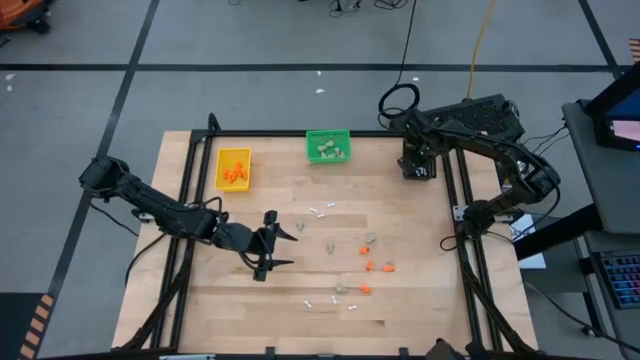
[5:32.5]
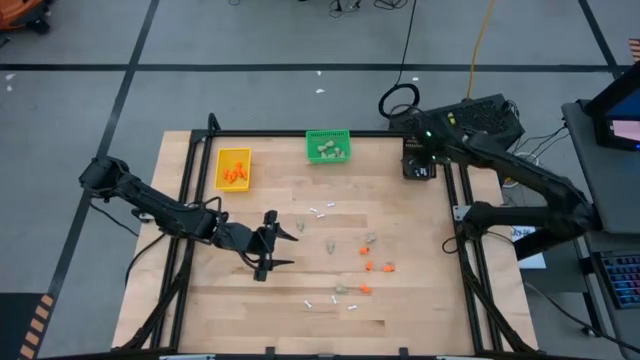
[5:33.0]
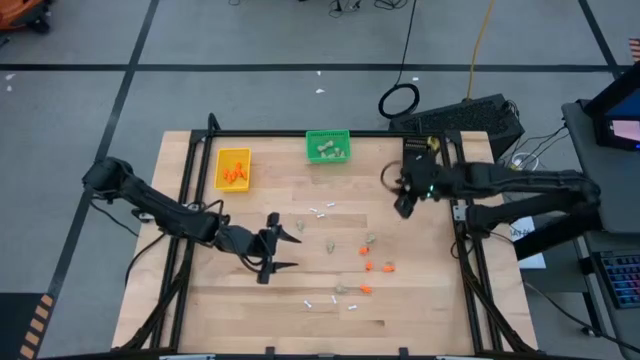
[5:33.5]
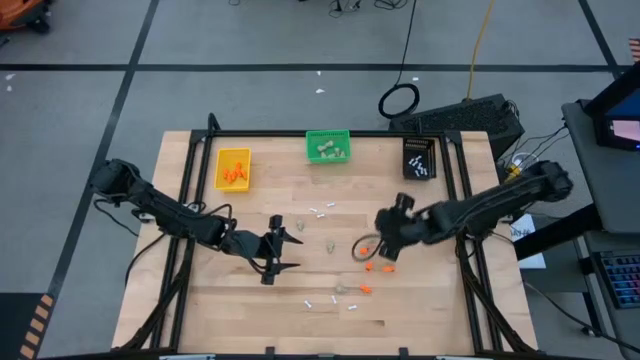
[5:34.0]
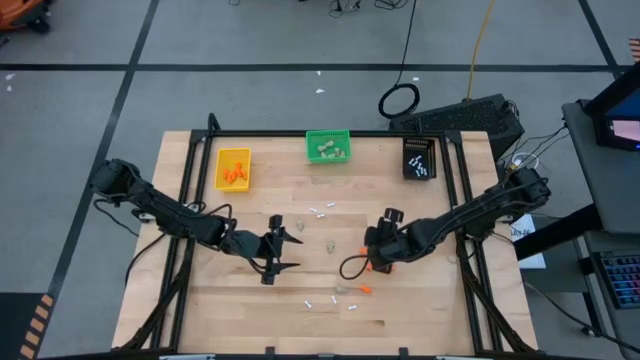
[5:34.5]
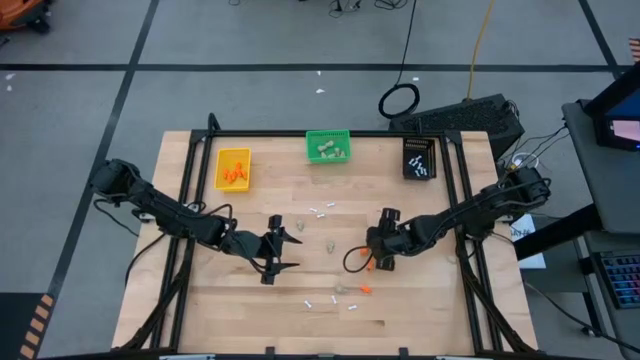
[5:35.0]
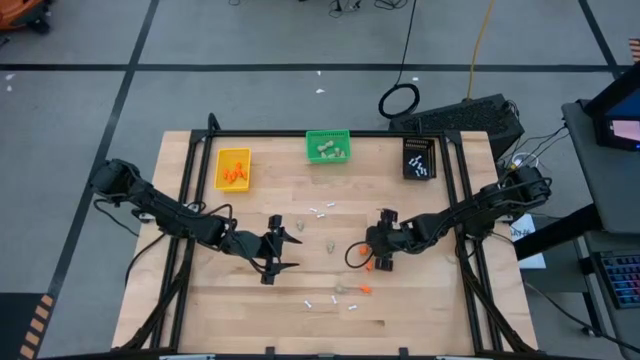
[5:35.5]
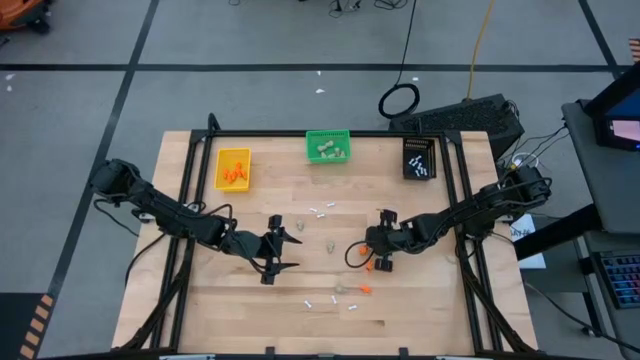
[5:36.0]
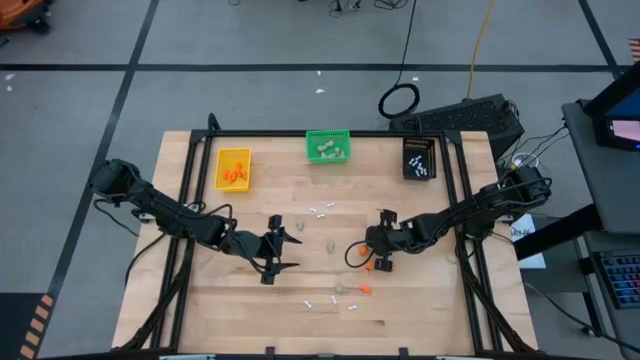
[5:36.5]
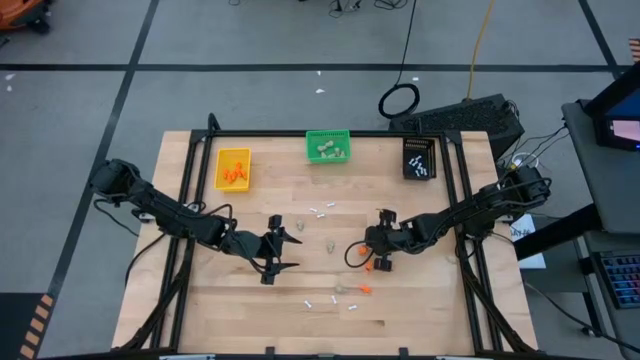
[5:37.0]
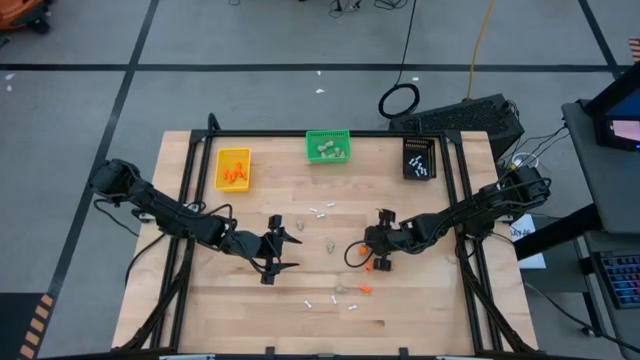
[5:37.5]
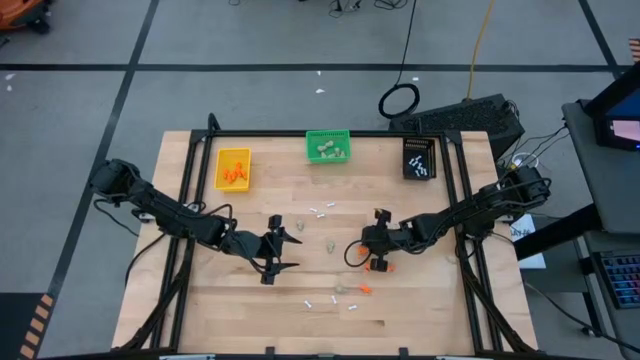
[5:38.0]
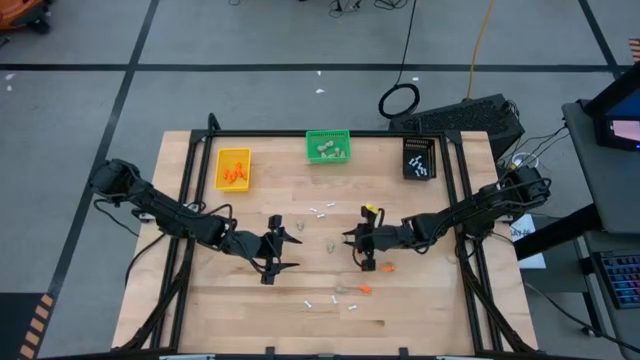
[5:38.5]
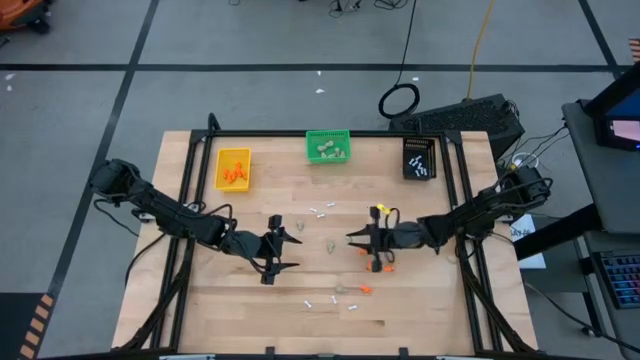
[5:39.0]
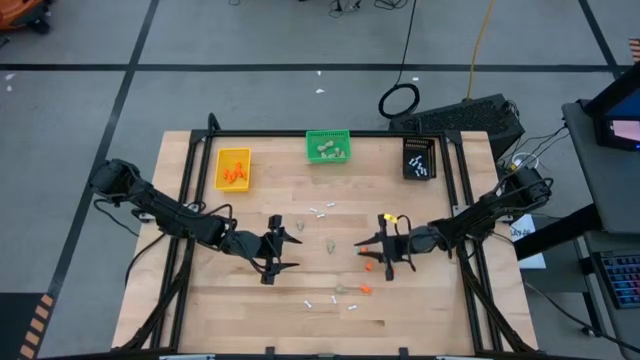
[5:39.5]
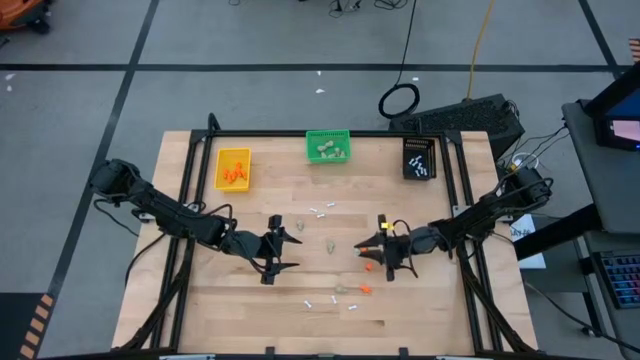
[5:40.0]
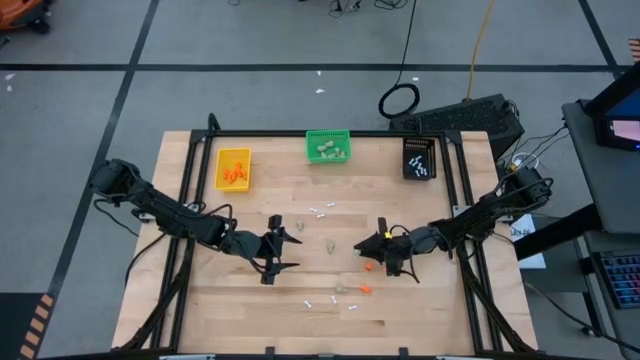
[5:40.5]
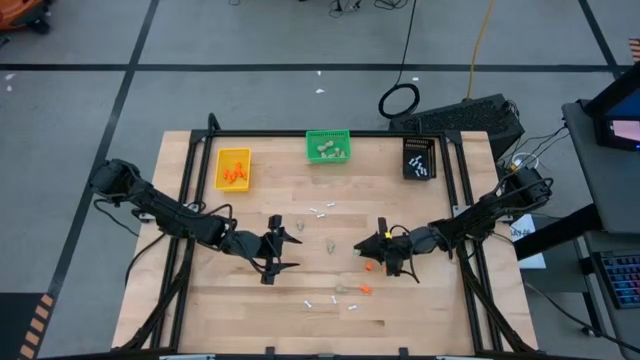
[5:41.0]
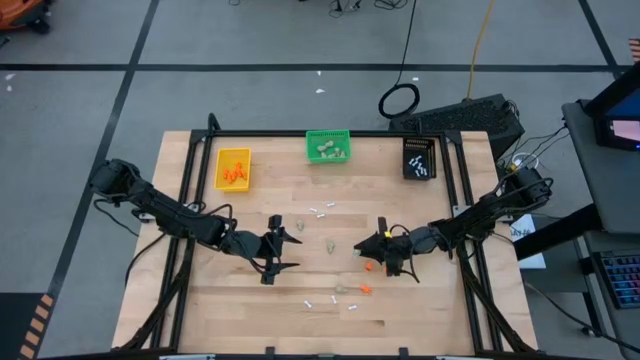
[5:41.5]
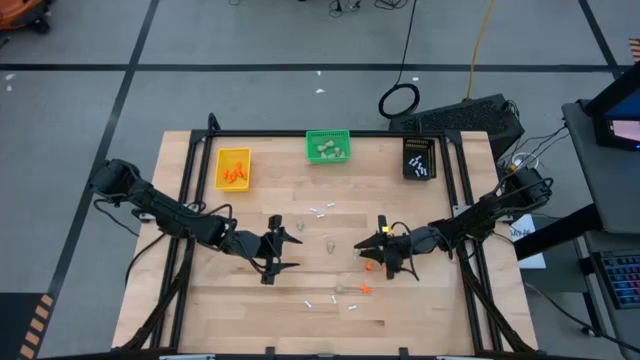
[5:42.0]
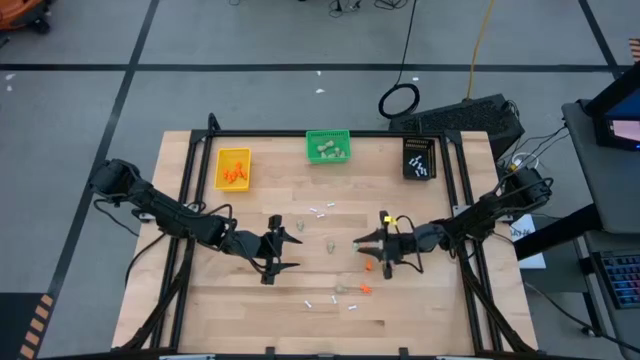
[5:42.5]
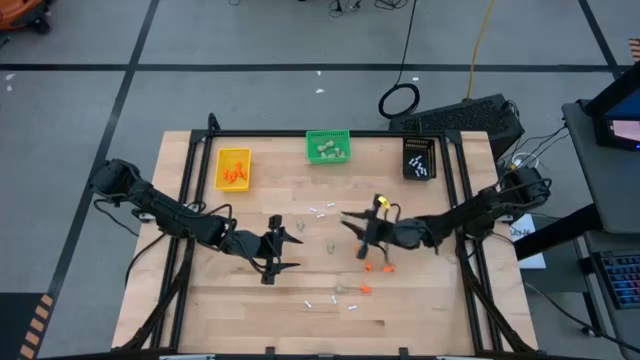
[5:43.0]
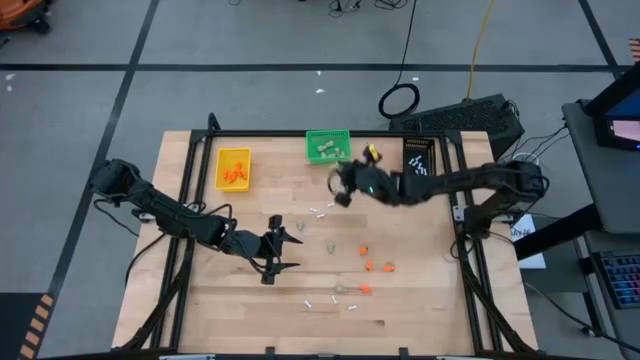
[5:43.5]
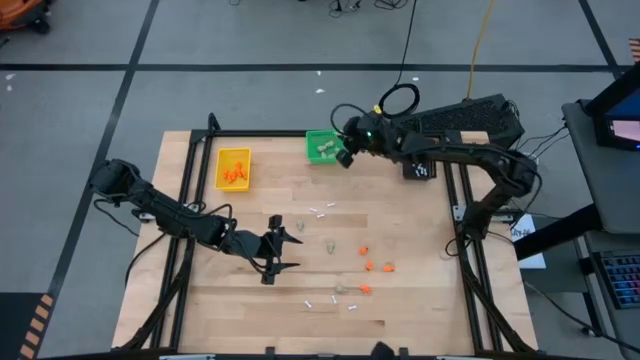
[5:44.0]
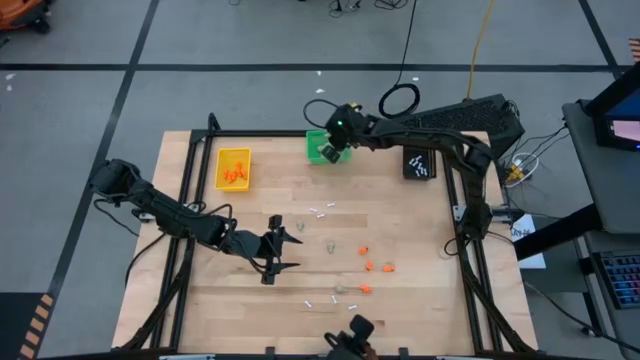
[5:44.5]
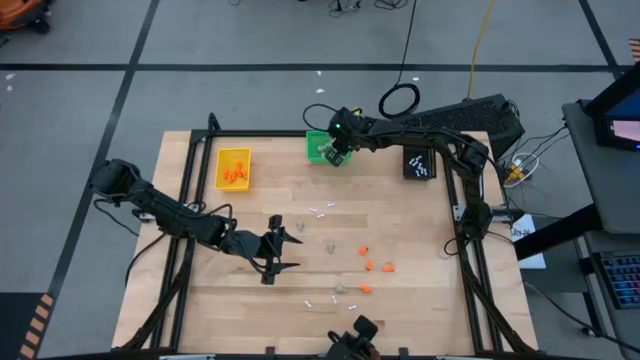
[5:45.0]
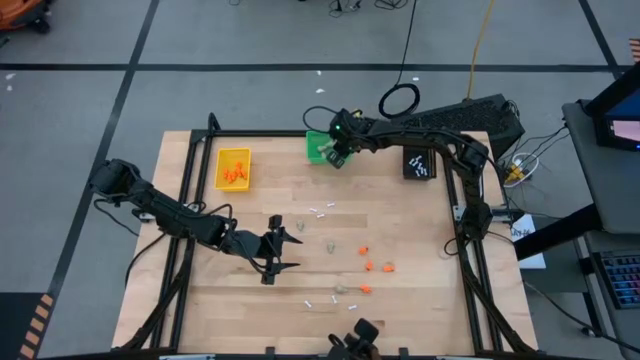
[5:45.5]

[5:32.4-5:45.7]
Task: Sort Halloween decoration
Put the gray skull toy into the green bin

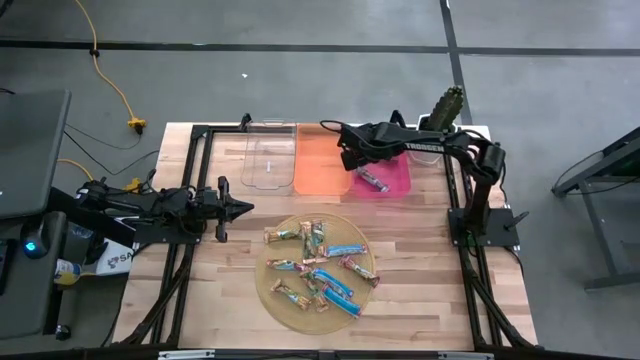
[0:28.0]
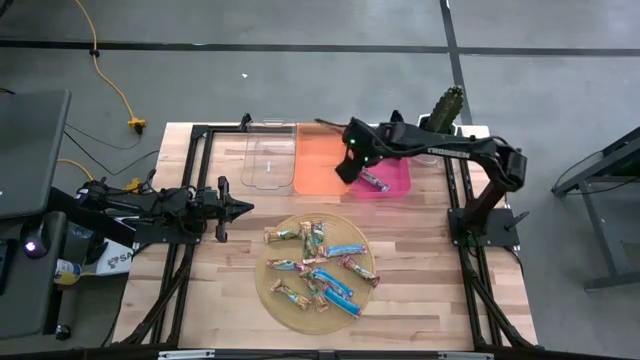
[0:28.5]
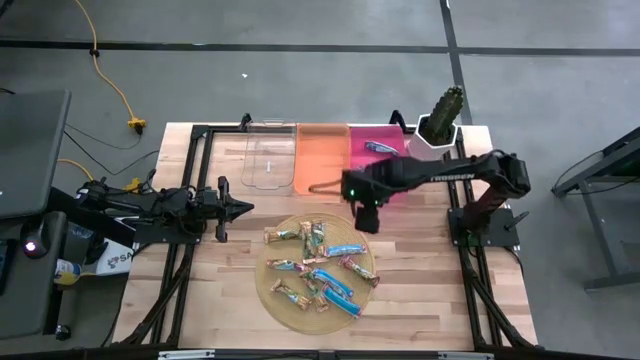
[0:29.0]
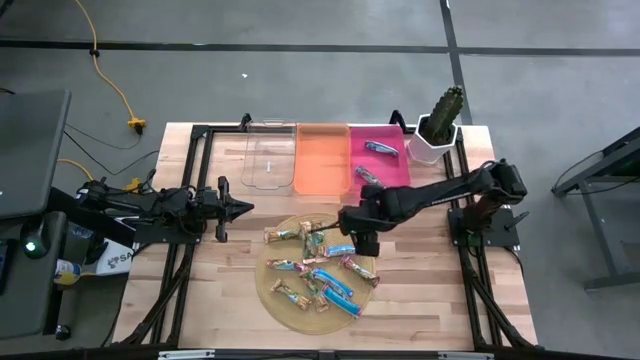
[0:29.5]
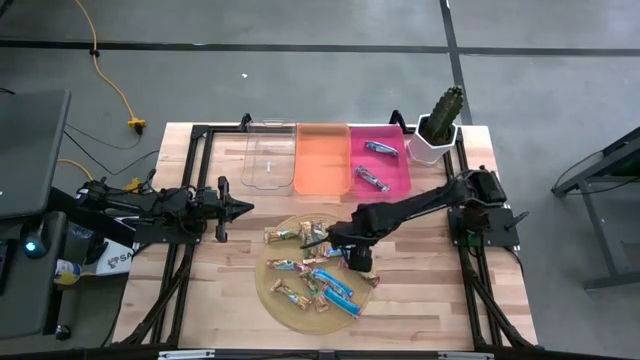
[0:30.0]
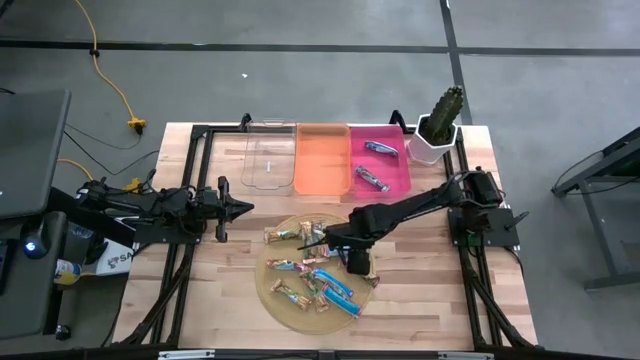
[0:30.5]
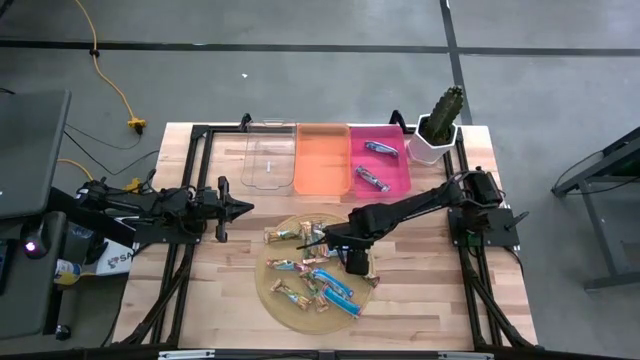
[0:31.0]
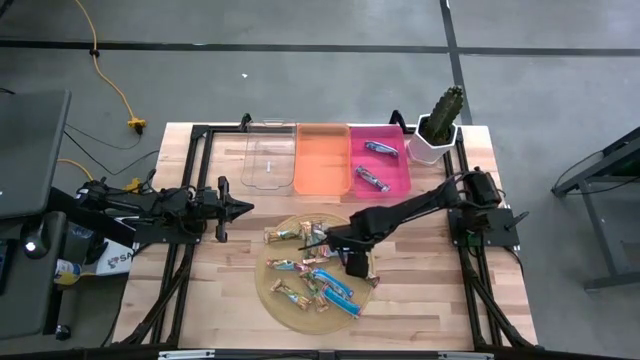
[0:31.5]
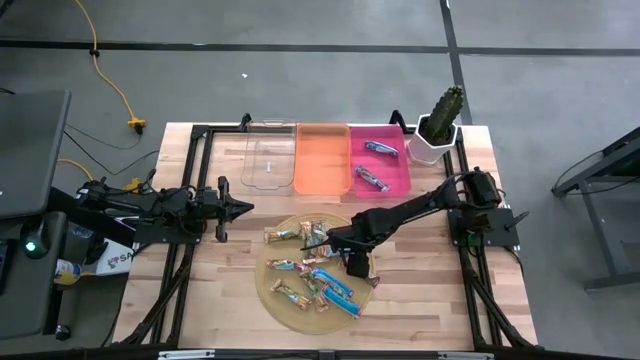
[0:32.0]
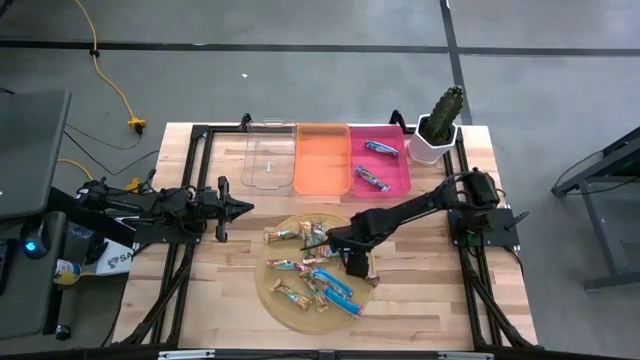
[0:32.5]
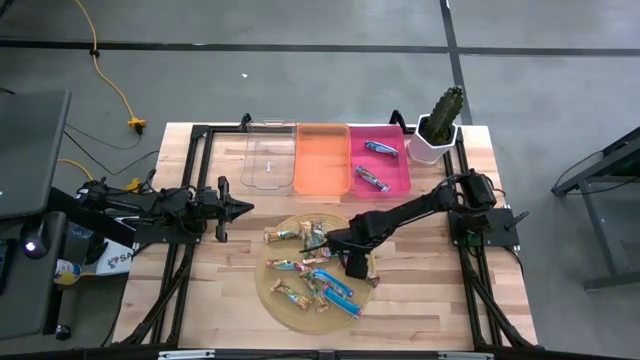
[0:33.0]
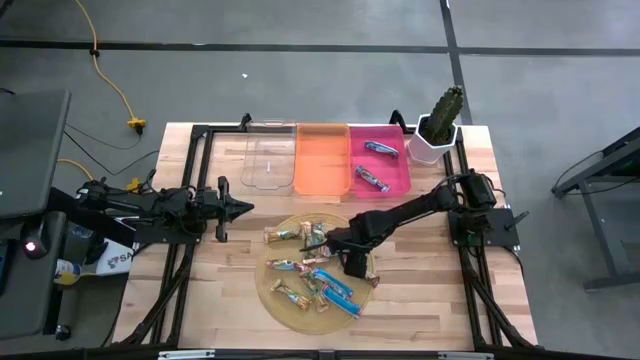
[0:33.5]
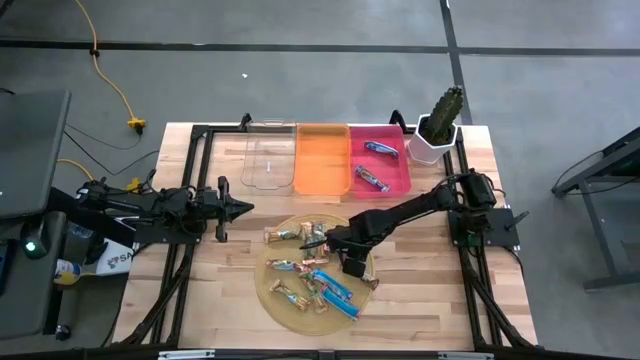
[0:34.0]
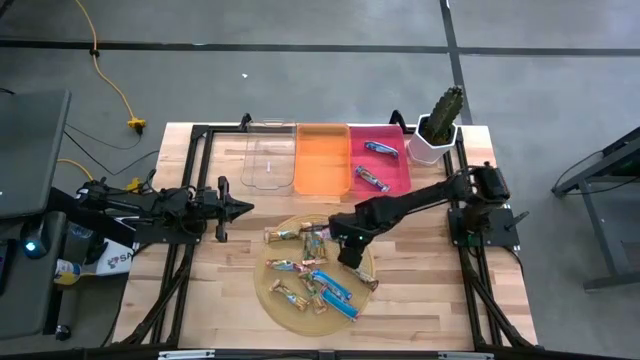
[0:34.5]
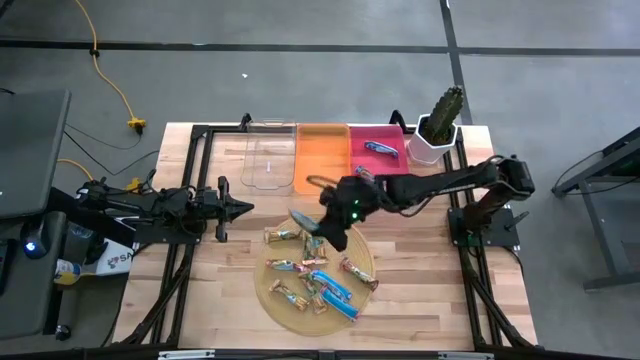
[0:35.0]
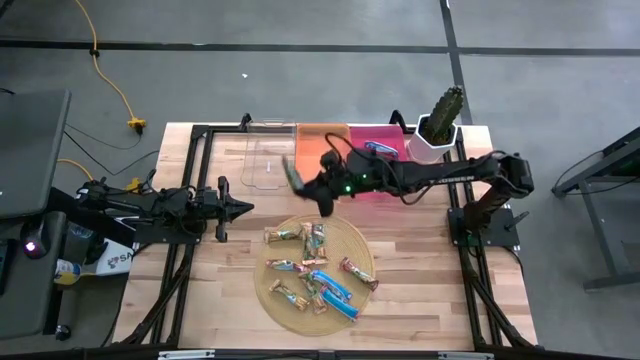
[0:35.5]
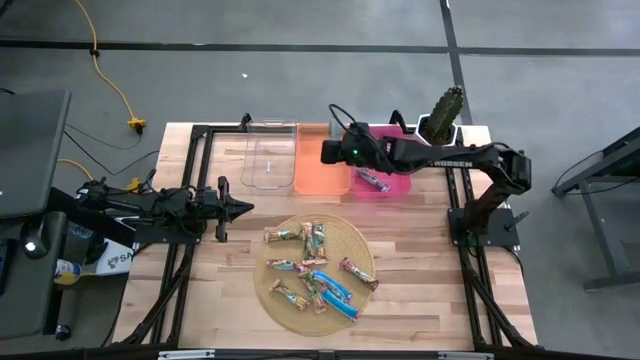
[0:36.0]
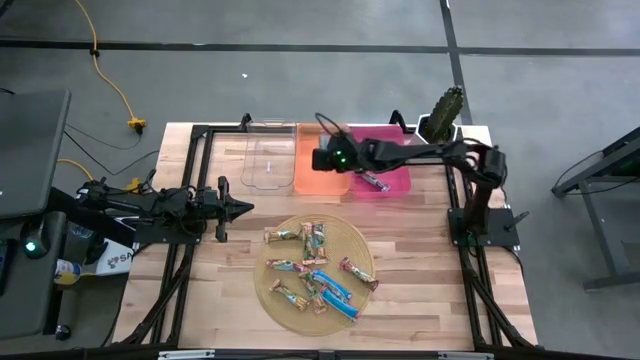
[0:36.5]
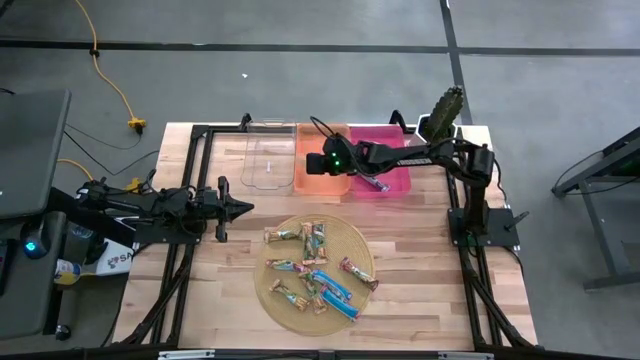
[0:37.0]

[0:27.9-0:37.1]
Task: Pick and place Granola Bars by type
Put the red granola bar into the orange bin
